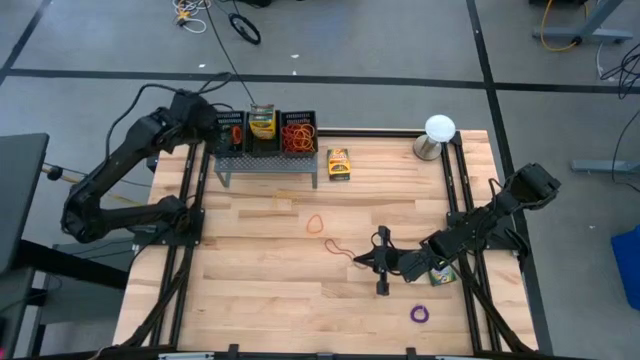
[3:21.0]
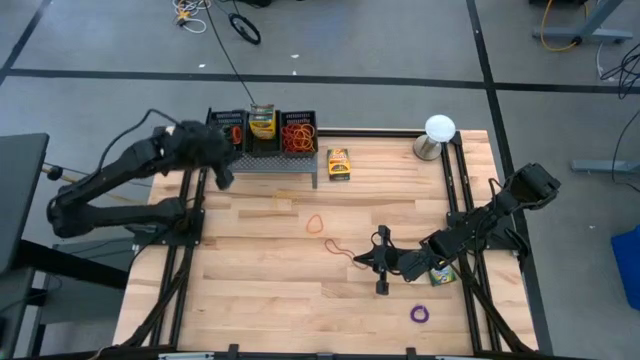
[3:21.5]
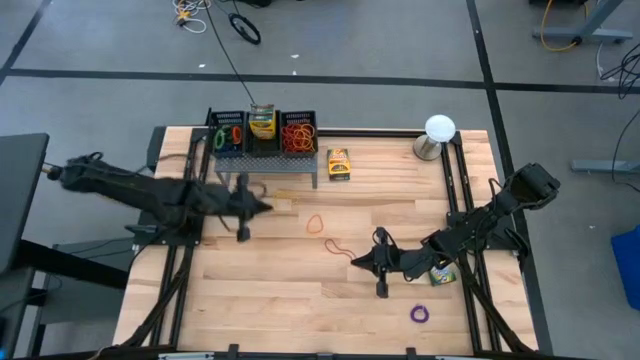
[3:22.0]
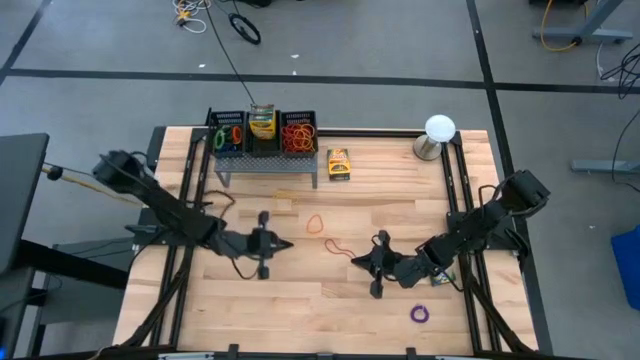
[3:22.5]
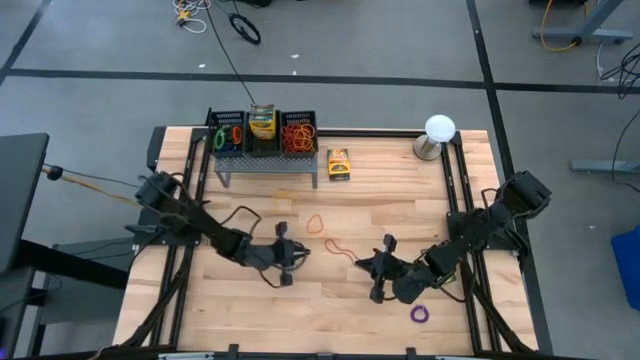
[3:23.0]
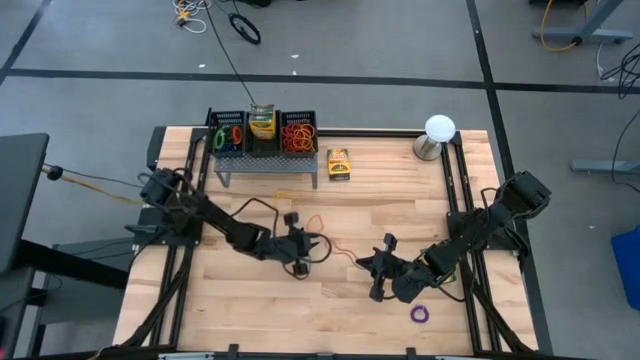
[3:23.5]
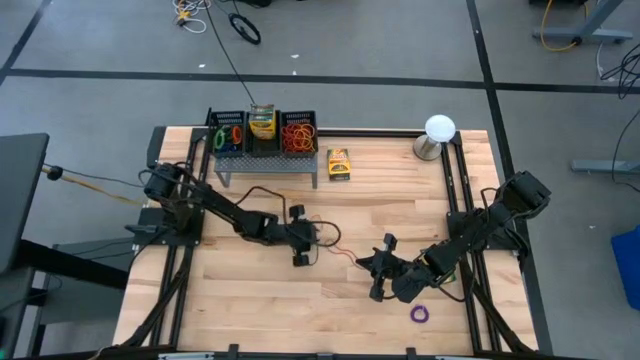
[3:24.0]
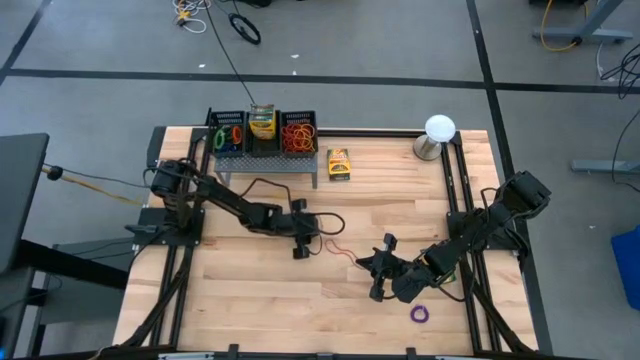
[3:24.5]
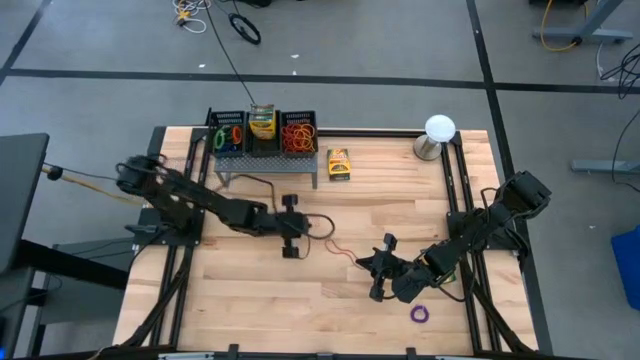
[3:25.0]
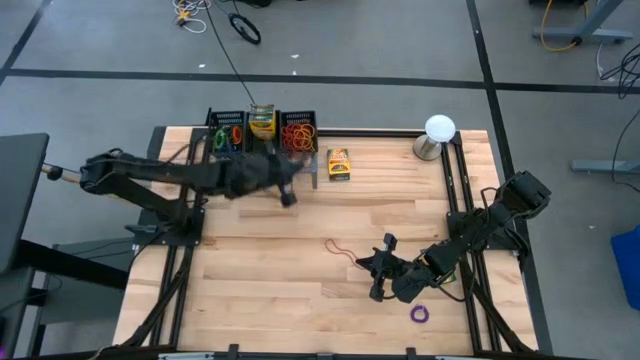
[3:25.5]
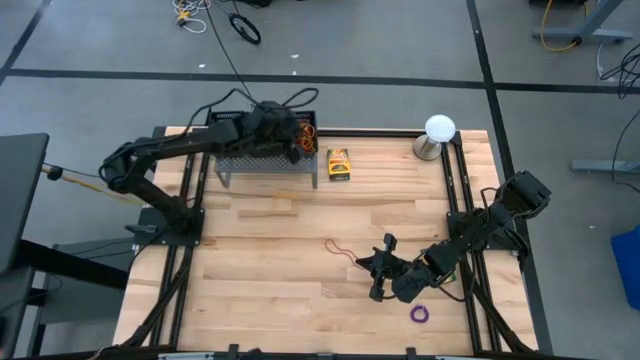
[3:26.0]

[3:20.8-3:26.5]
Task: Pick & Place Office Desk Supplies
Put the orange rubber band into the left black bin

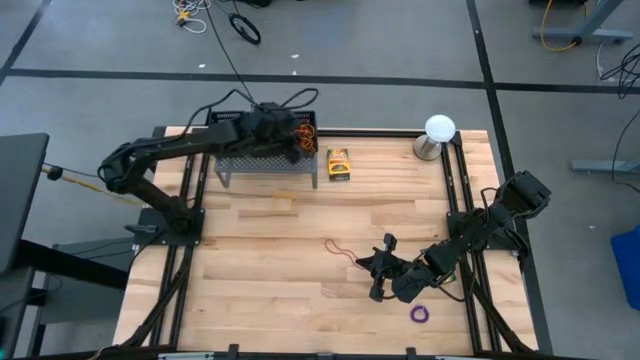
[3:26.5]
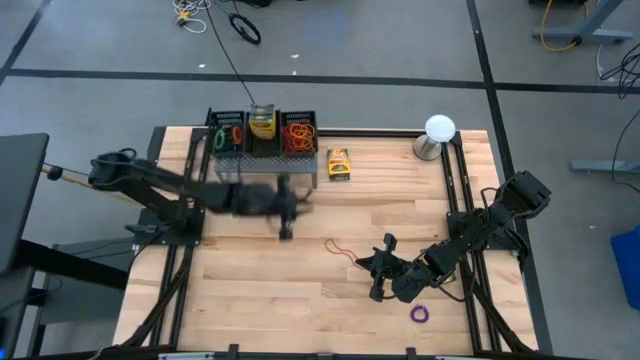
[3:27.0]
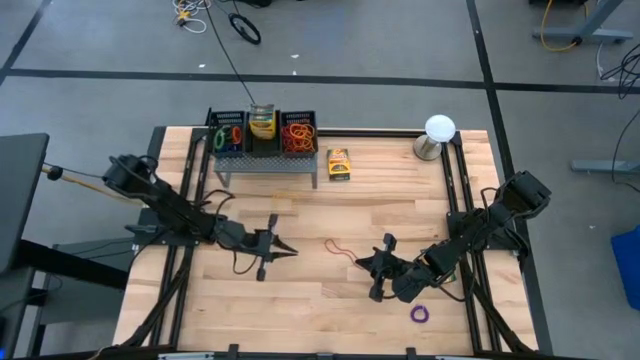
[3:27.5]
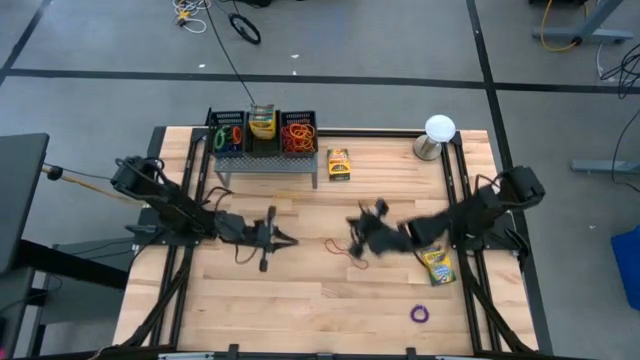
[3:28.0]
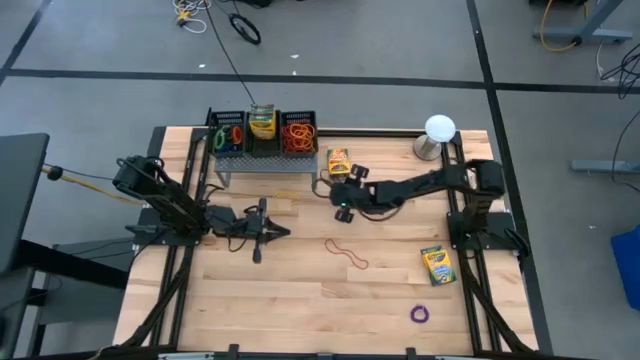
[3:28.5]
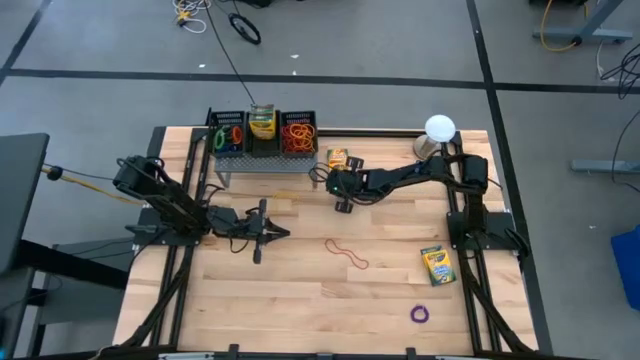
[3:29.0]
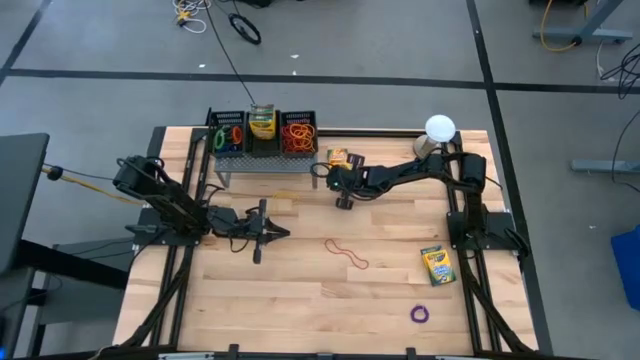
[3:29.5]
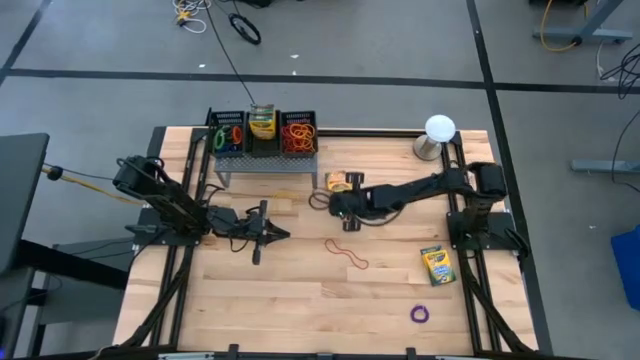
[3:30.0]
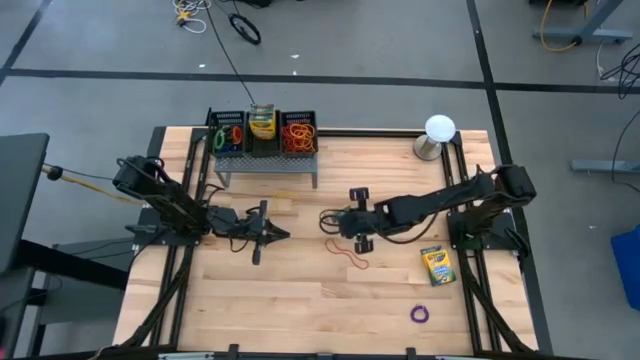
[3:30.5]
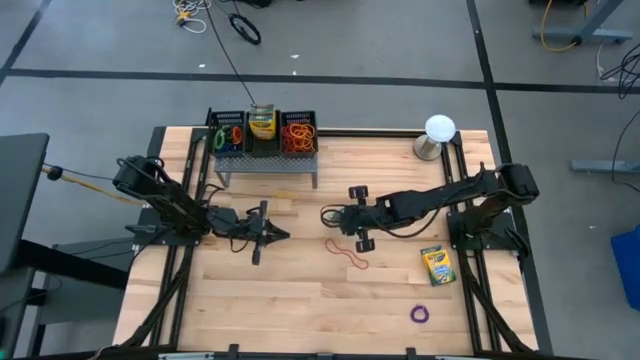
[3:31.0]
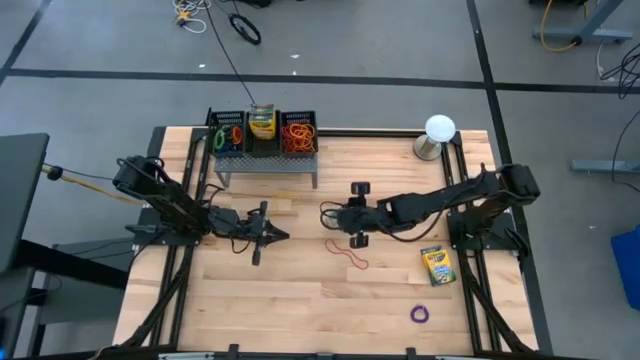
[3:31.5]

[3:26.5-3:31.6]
Put the yellow crayon box into the middle black bin

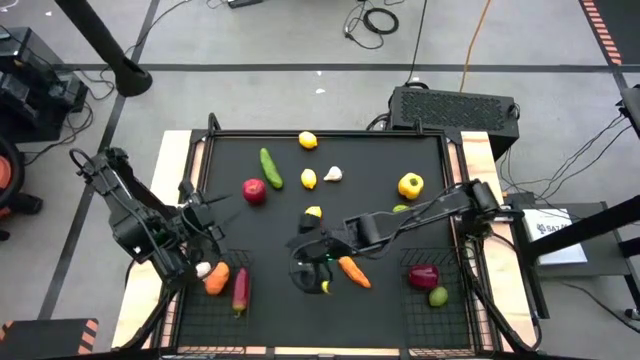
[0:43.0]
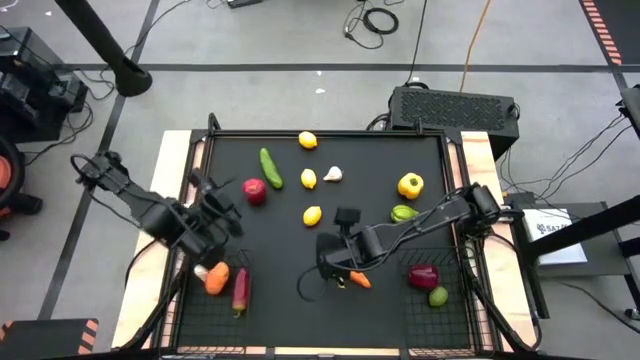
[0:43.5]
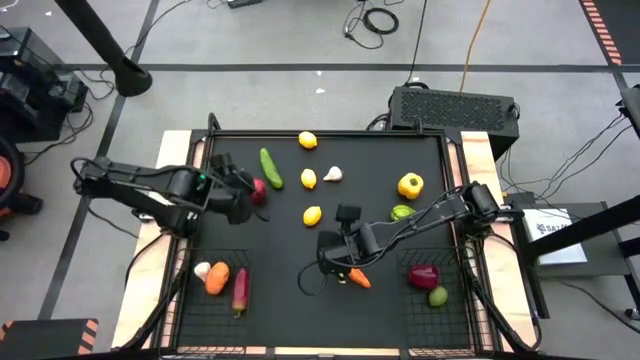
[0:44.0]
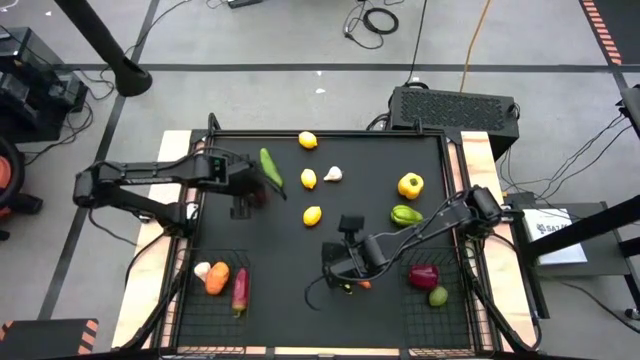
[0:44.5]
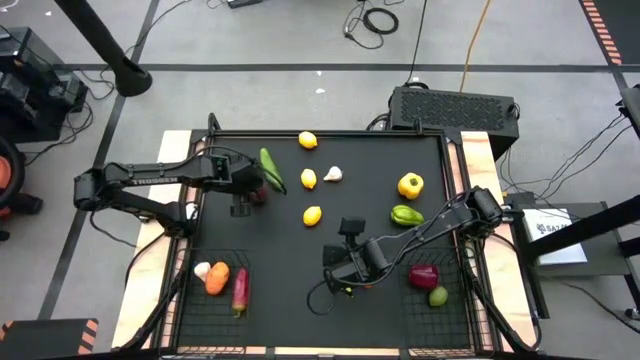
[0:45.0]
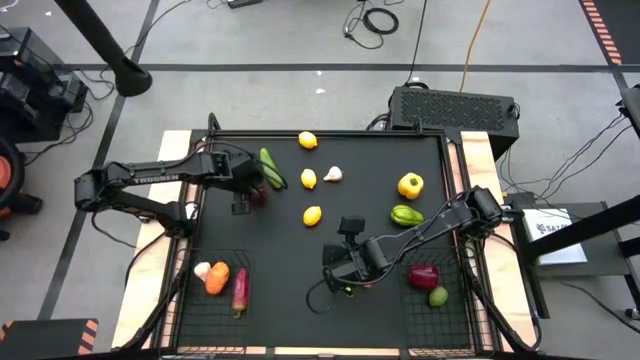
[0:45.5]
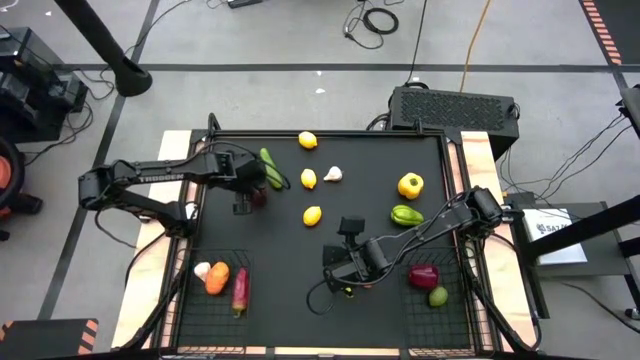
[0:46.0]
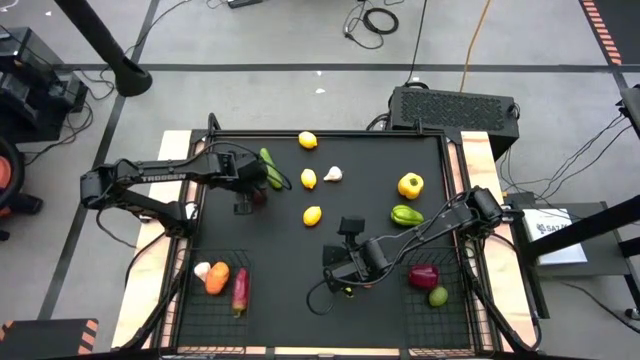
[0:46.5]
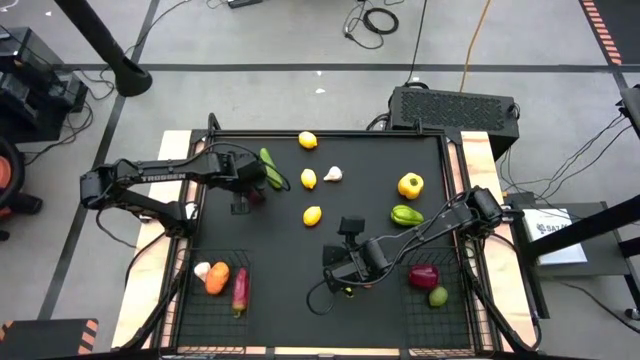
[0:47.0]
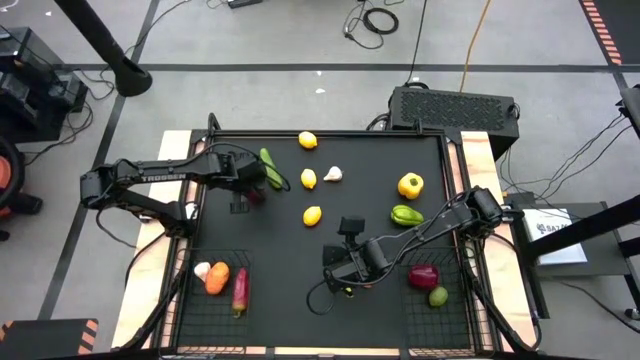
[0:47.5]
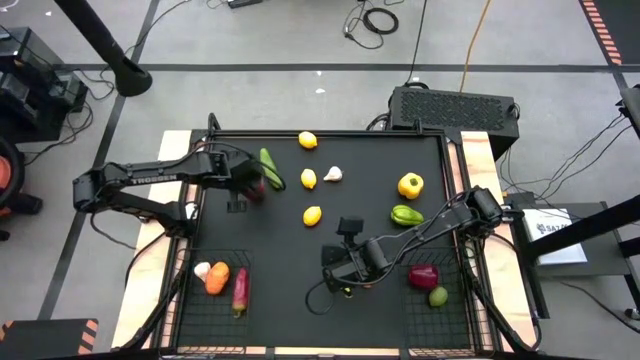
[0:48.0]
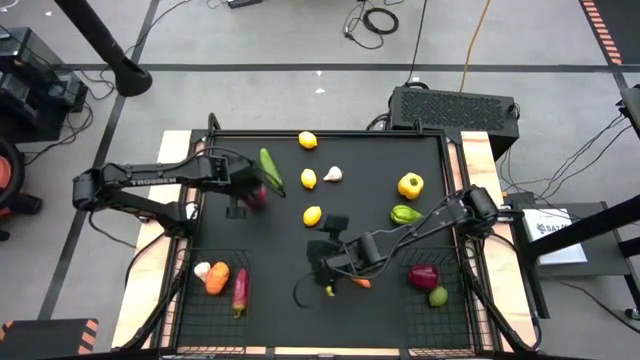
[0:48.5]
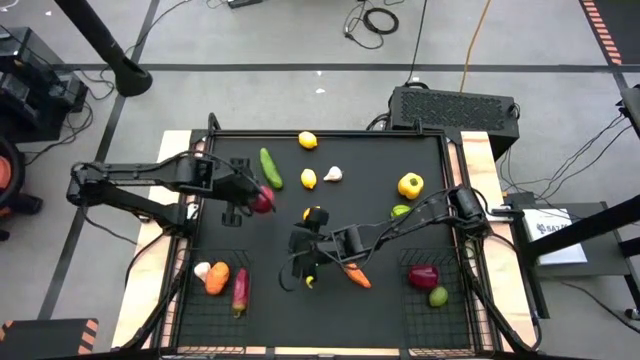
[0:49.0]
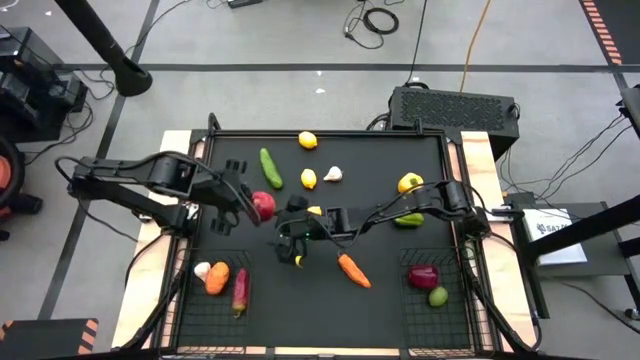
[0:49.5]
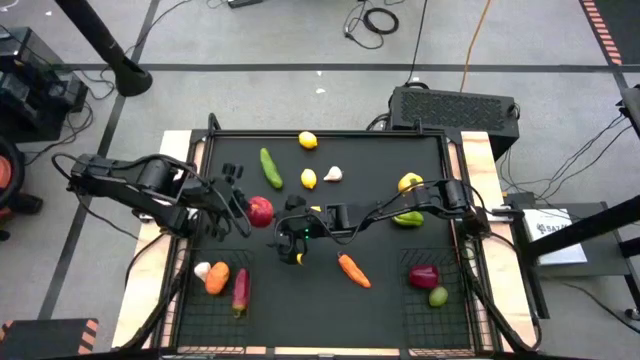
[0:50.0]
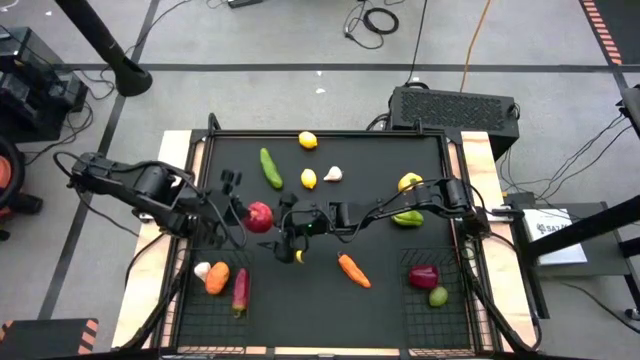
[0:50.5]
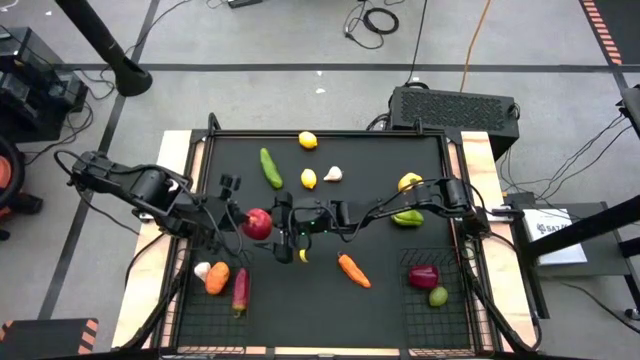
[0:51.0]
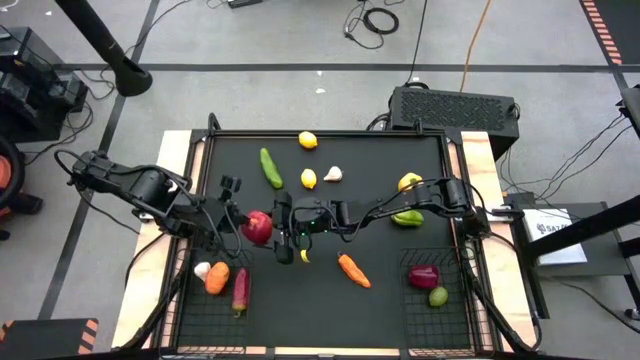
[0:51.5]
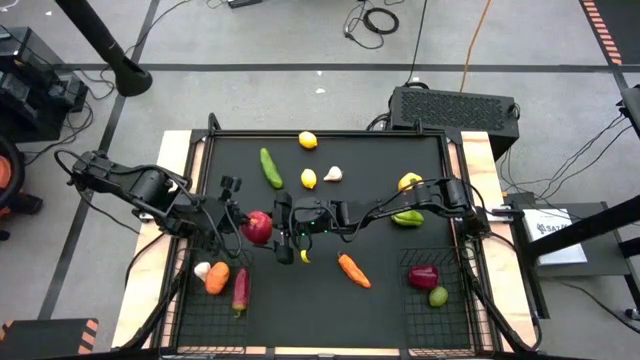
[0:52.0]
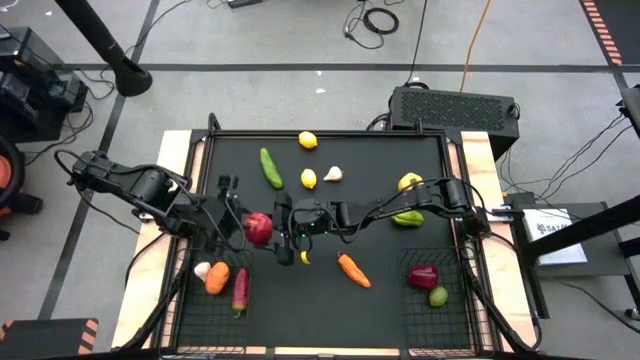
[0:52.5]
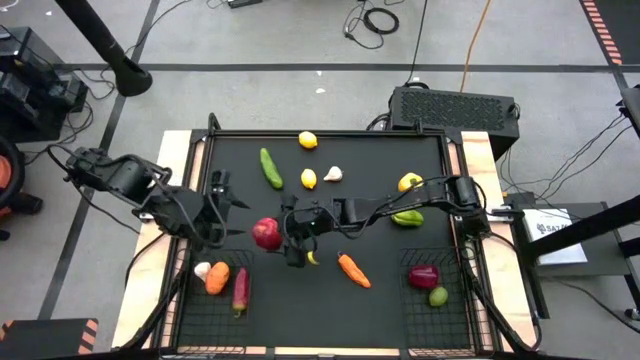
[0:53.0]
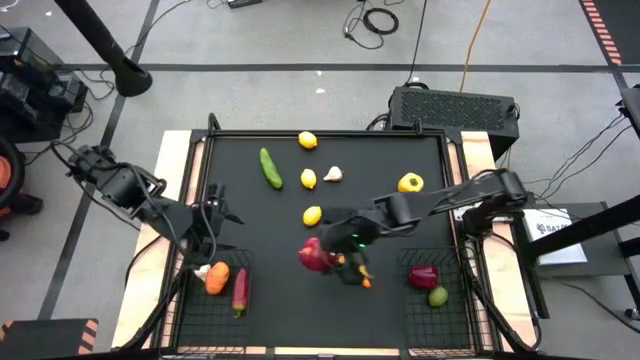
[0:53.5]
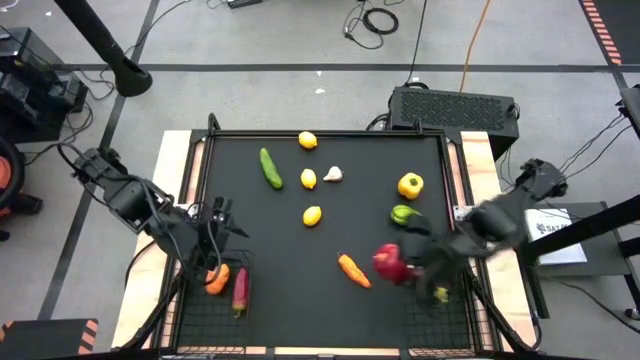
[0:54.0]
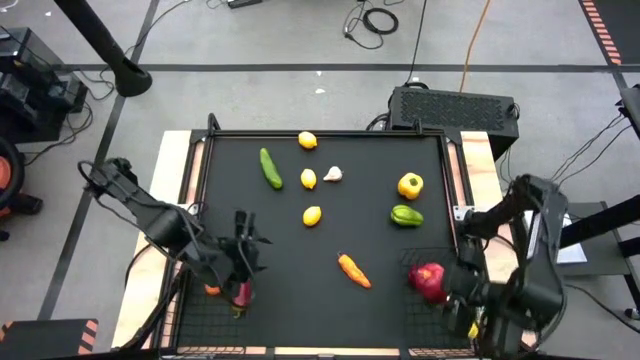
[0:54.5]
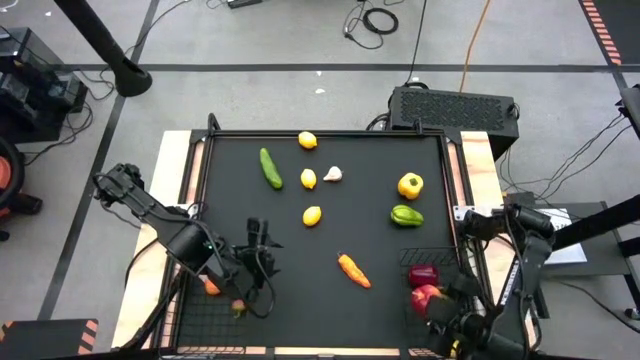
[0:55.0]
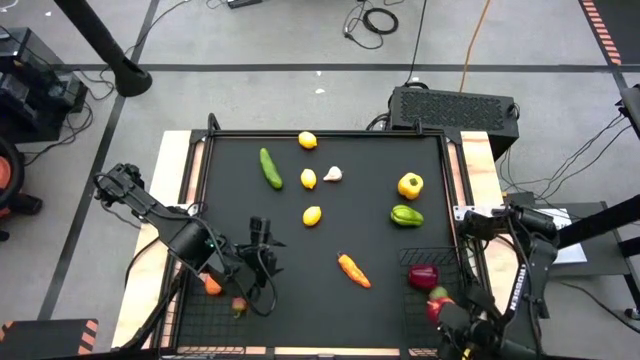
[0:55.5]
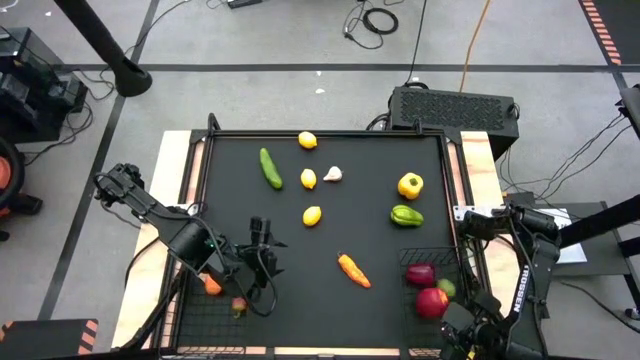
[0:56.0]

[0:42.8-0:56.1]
Task: Sort produce into baskets
Put the apple into the bottom right basket
